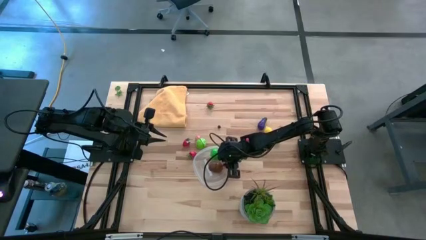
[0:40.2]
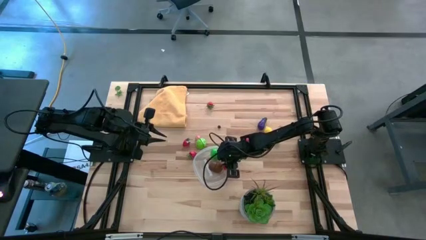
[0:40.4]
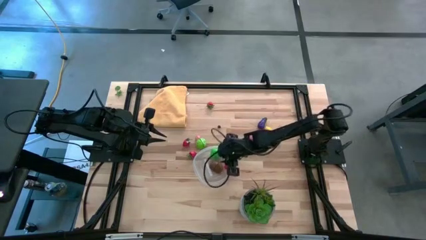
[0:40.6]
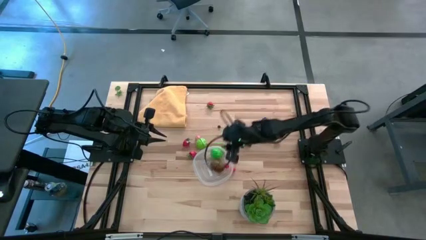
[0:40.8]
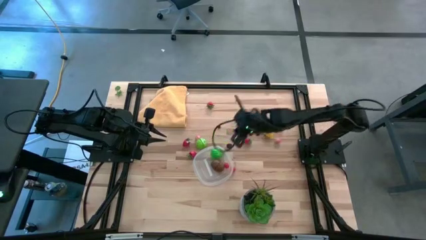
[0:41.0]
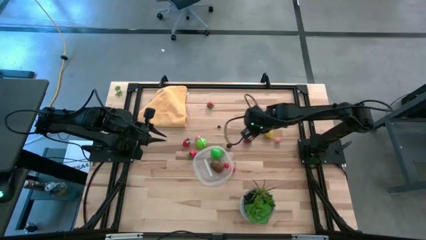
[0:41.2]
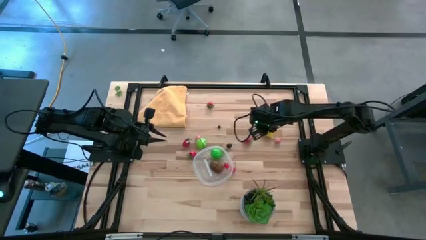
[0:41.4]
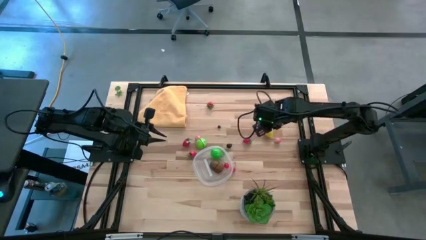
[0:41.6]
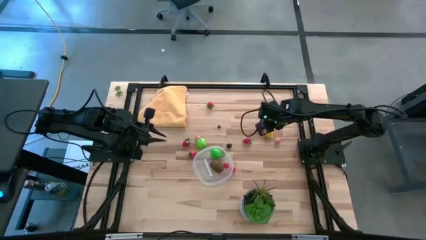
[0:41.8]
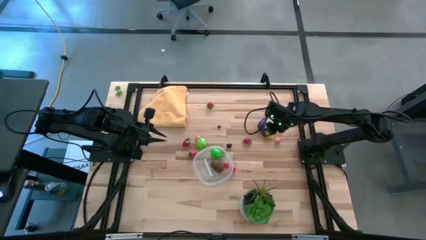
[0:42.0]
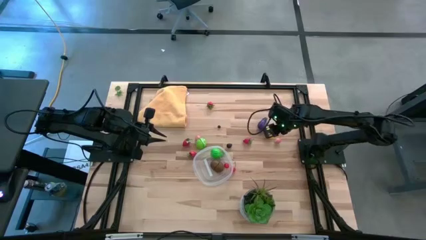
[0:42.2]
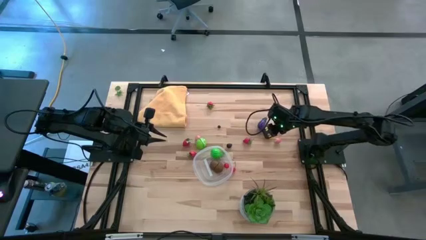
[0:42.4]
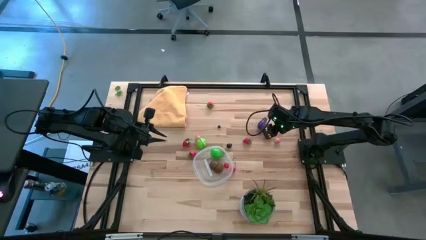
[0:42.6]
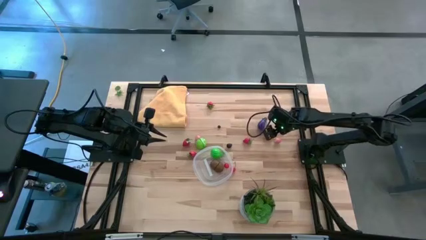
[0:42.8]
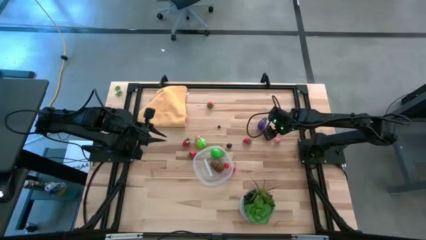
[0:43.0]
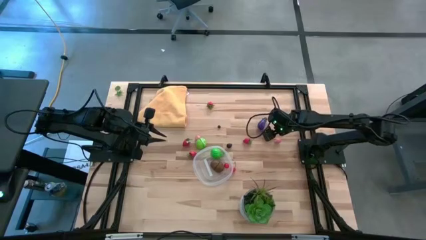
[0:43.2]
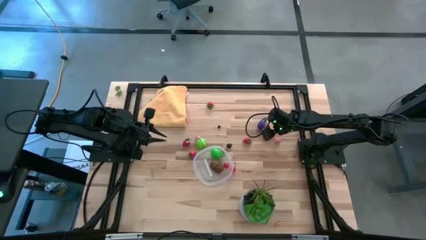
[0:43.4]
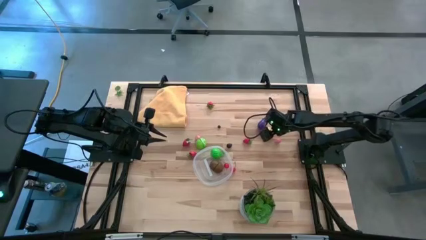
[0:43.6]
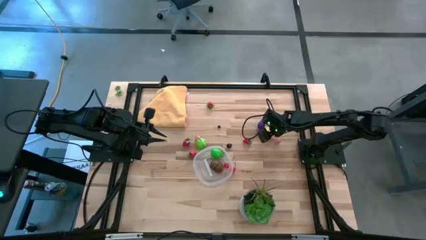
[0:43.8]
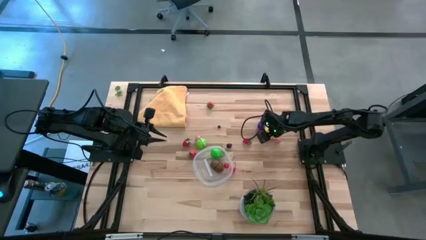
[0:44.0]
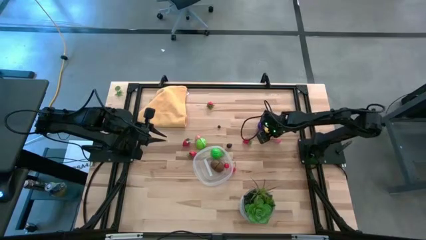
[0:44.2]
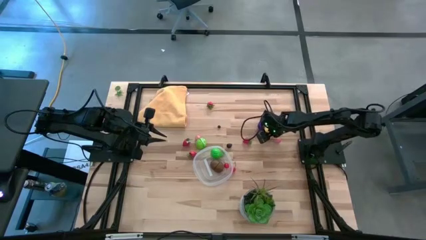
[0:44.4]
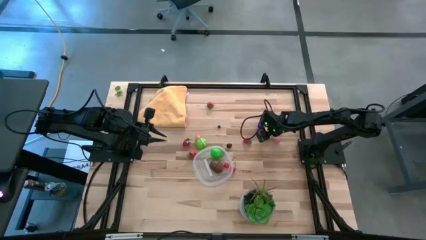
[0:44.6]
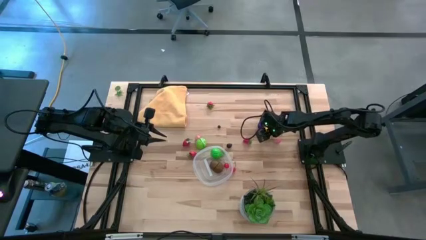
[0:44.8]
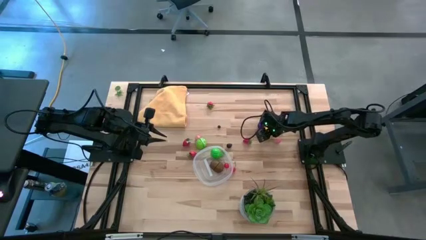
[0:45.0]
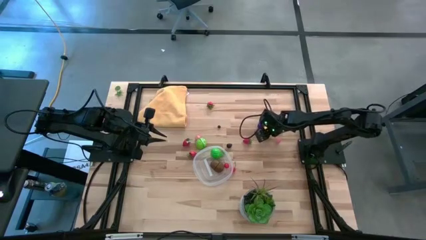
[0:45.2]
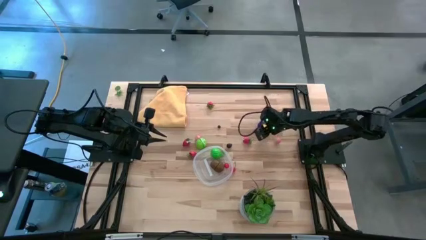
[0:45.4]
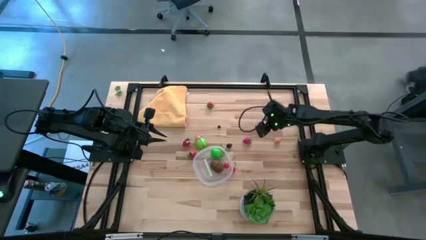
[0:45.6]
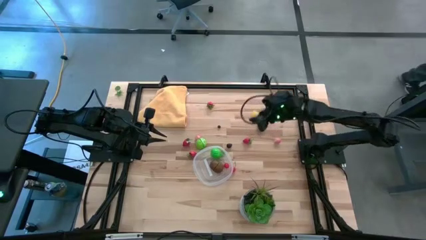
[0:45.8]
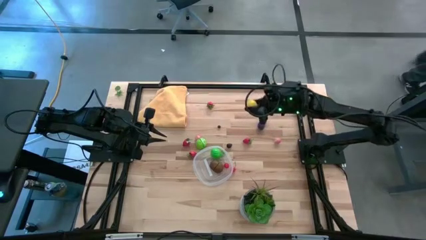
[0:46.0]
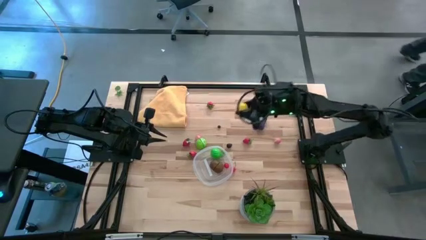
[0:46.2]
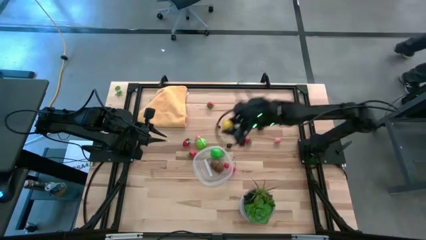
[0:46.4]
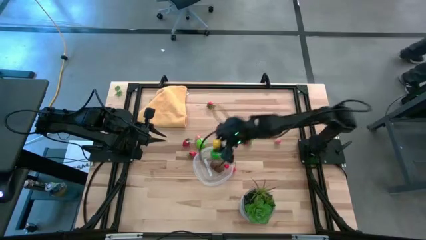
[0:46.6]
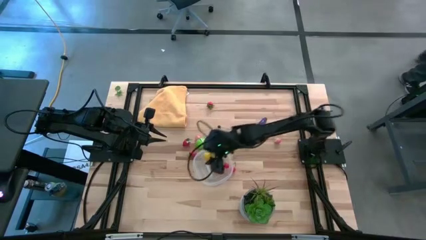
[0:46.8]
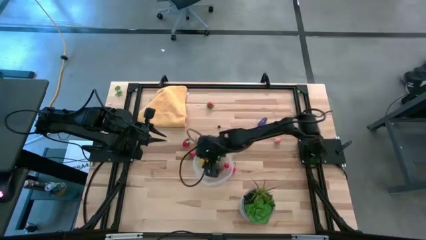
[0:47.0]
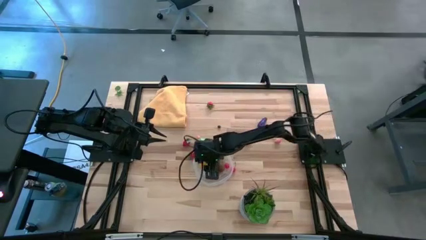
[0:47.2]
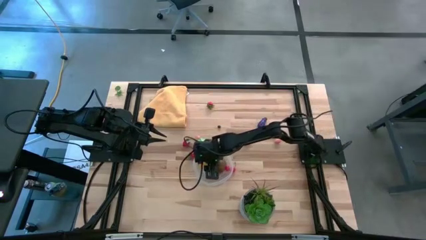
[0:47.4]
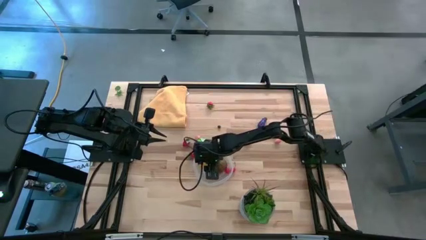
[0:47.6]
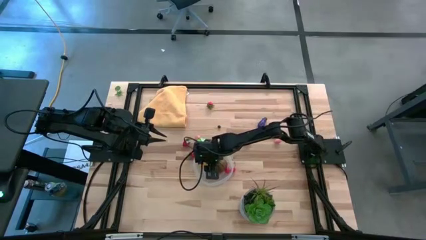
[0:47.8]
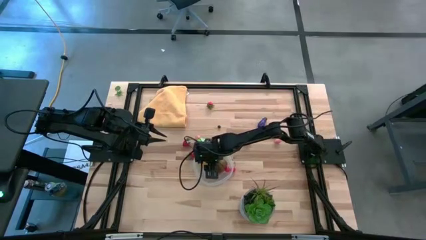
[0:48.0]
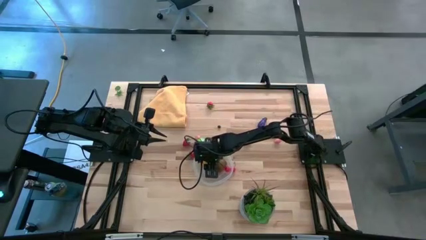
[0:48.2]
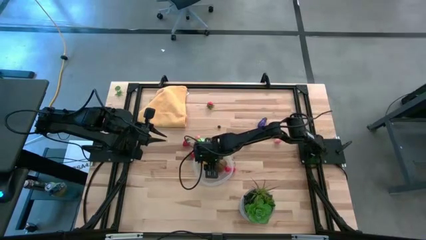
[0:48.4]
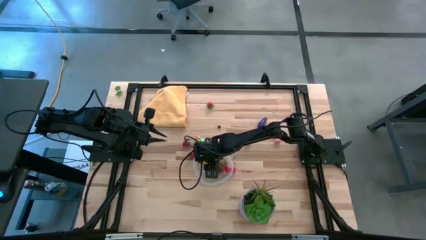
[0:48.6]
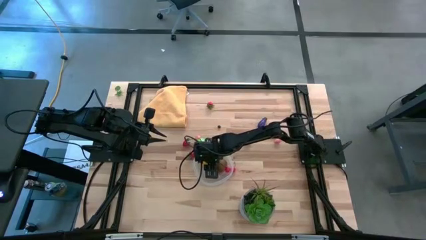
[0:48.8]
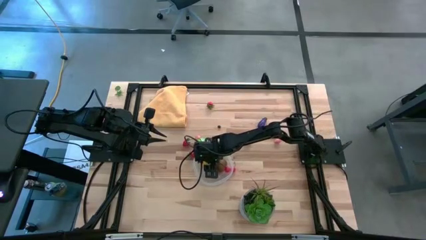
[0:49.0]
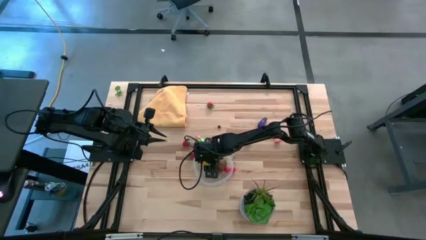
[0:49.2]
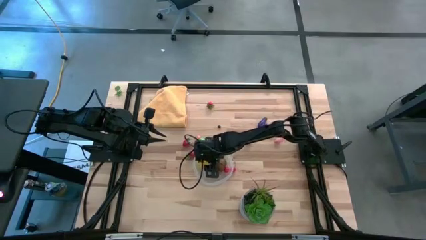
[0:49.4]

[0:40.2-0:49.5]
Task: Pick and placing Produce into tupperware
Put the yellow lemon into the transparent bin

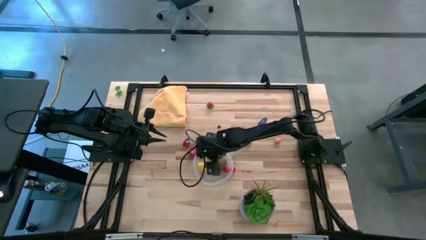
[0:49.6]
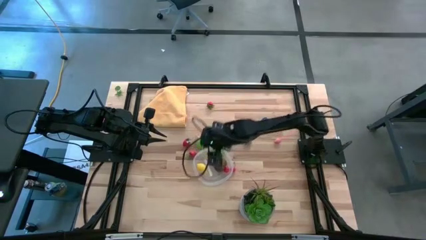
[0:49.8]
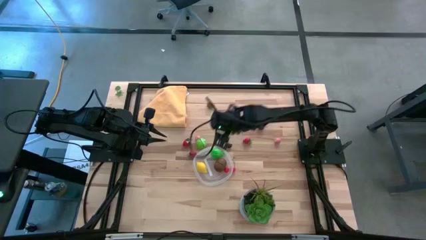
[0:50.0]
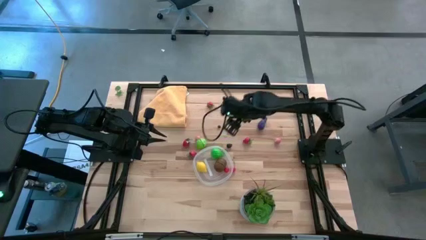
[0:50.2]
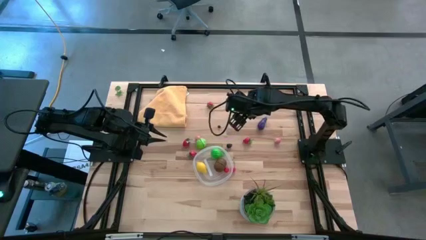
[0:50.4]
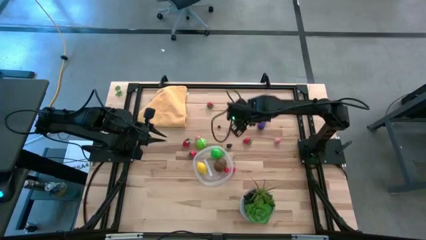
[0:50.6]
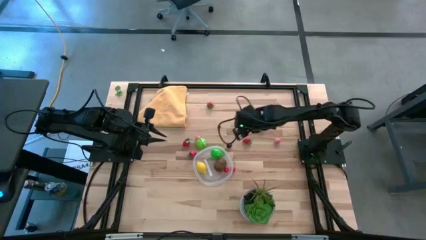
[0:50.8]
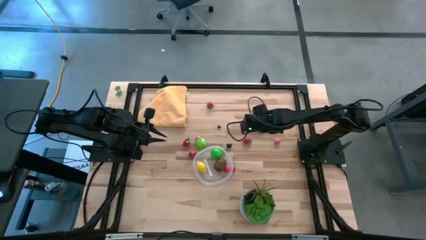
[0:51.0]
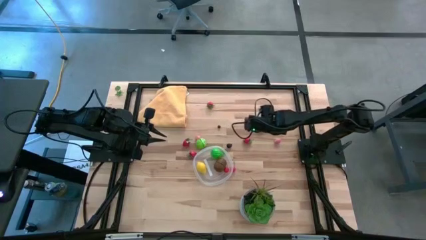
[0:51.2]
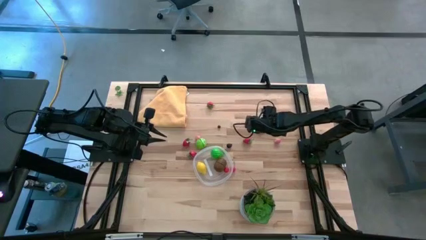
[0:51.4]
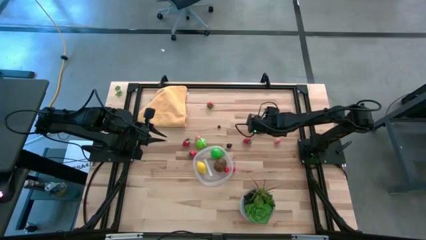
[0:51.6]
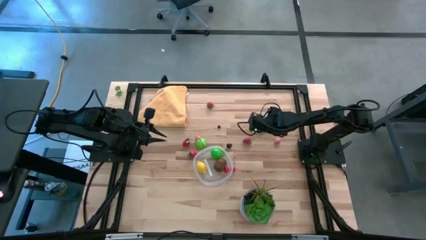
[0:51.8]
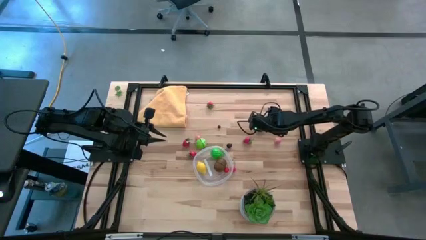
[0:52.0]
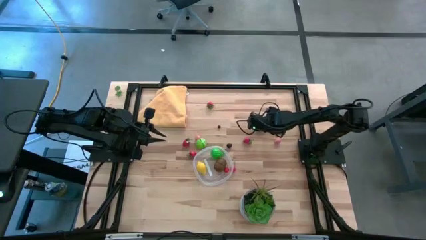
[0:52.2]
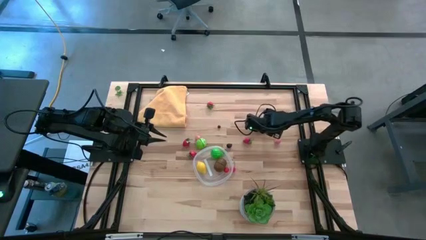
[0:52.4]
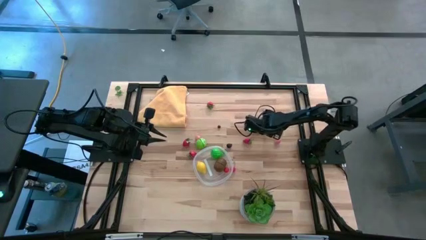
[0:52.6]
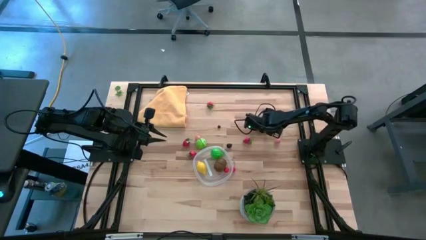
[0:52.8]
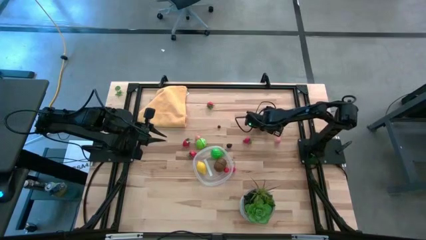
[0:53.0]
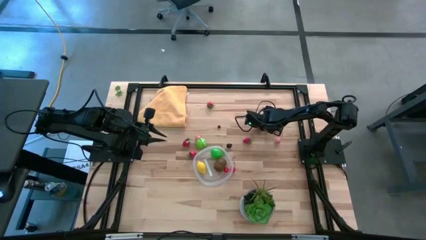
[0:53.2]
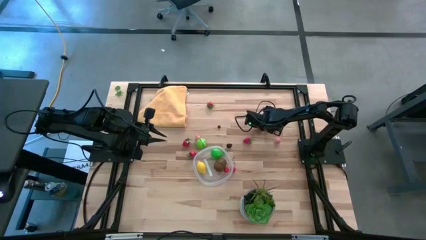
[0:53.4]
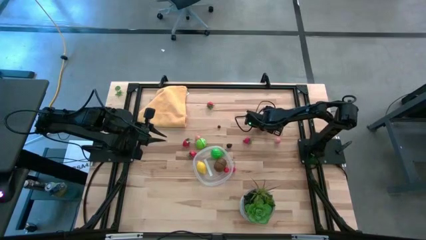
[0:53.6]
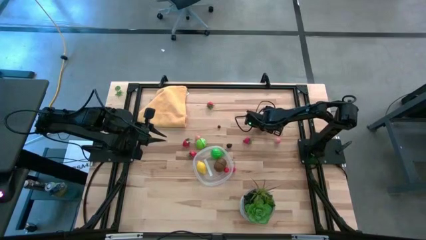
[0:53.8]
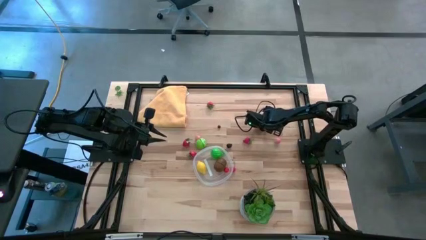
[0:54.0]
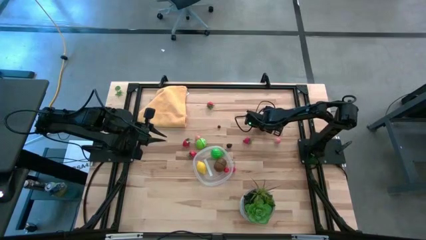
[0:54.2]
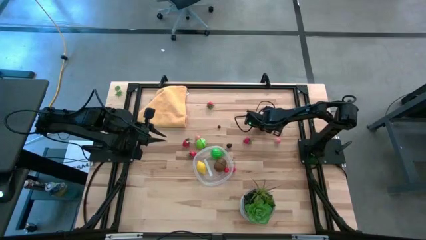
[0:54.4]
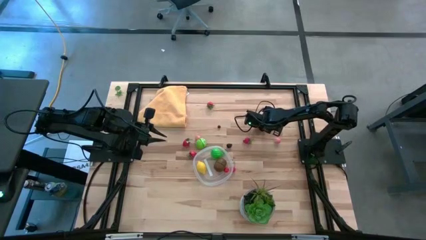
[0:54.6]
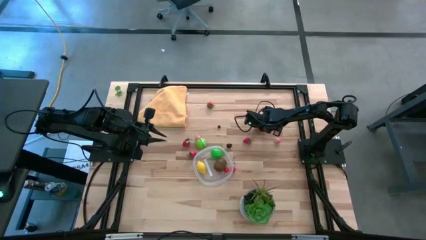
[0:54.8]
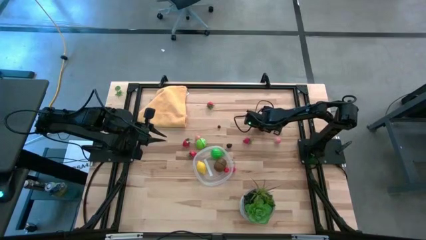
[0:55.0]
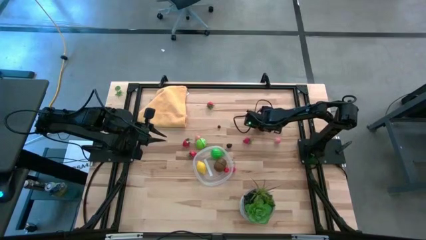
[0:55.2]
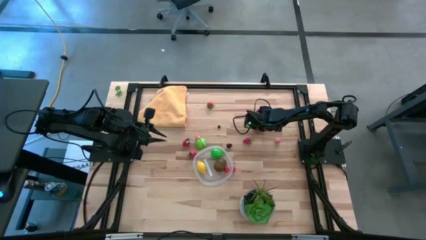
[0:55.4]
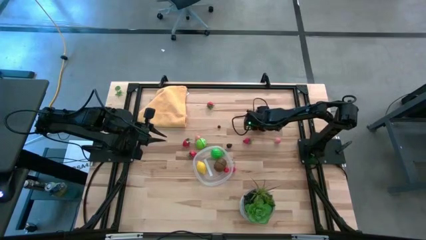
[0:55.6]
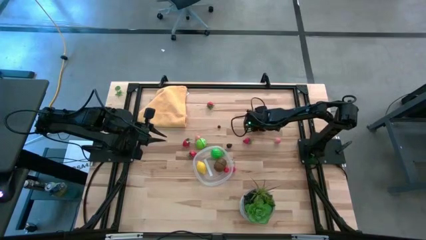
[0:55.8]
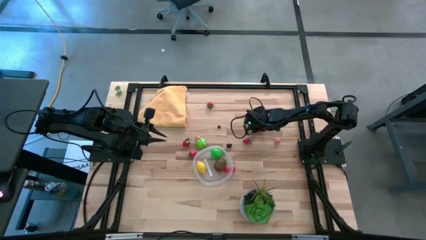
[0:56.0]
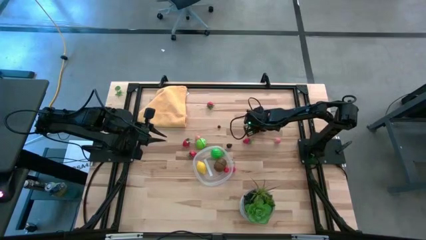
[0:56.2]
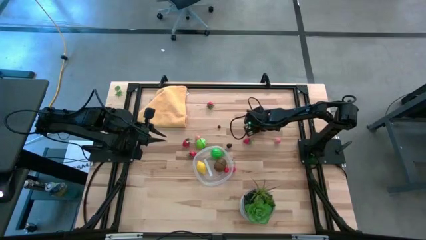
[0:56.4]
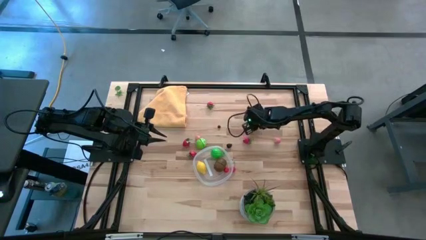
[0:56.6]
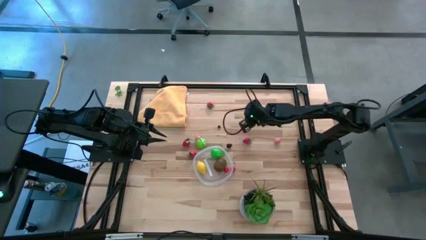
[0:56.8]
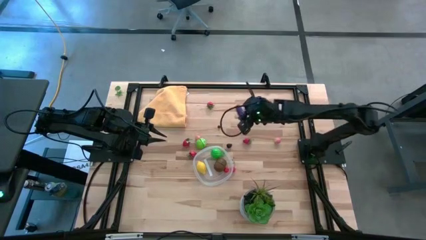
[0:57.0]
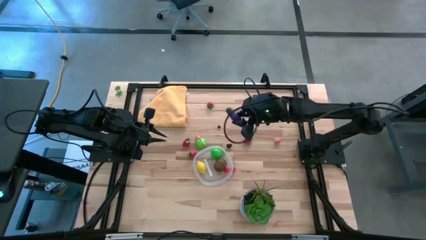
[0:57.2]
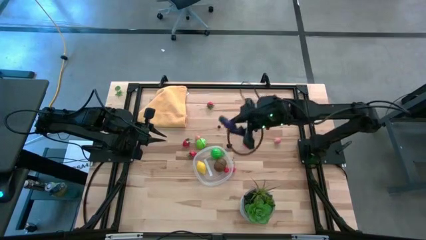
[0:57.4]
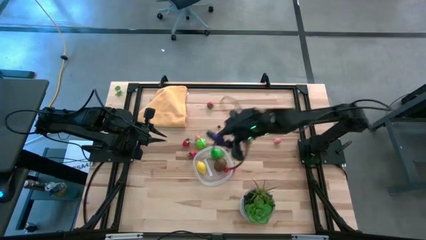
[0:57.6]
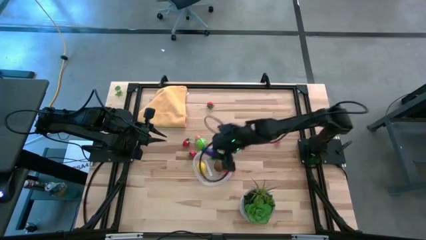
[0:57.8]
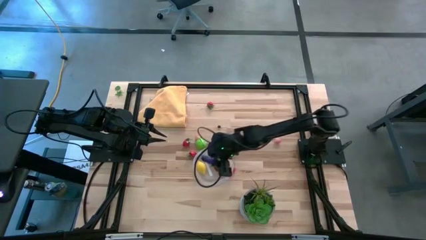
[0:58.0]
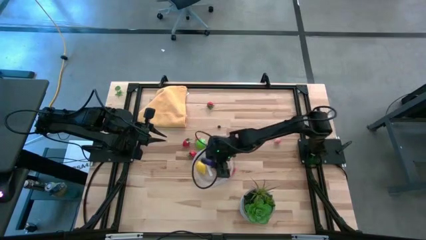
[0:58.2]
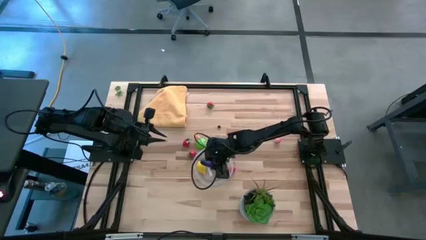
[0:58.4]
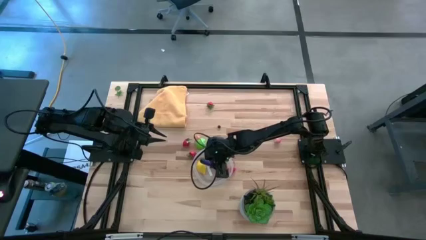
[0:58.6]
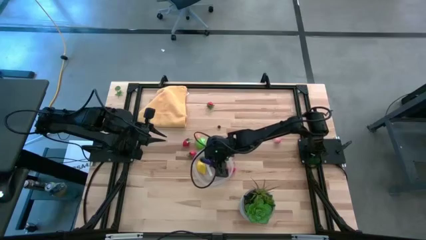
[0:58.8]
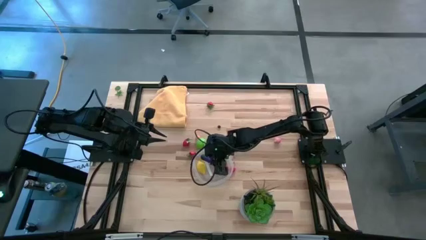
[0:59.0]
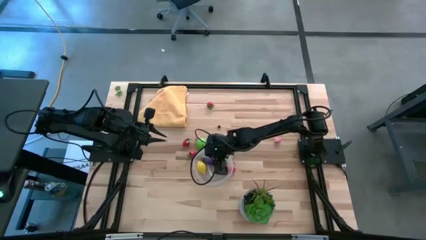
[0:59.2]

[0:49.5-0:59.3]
Put the purple eggplant into the transparent bin
